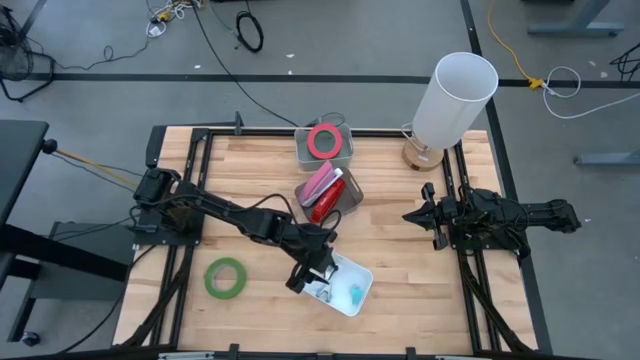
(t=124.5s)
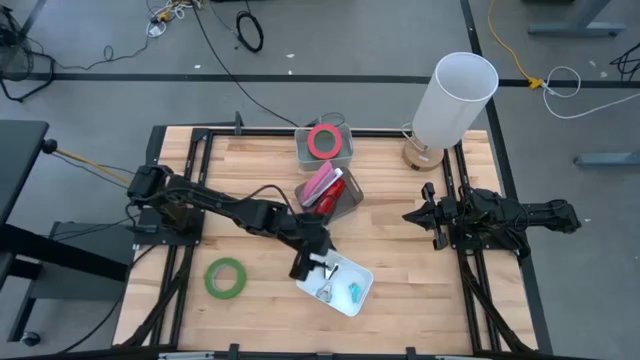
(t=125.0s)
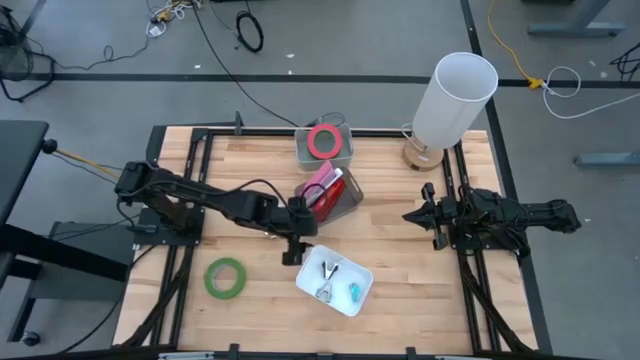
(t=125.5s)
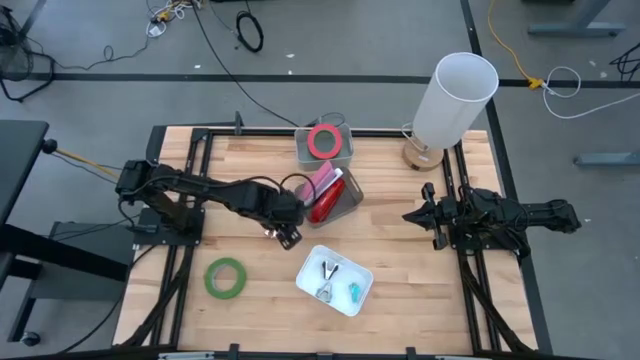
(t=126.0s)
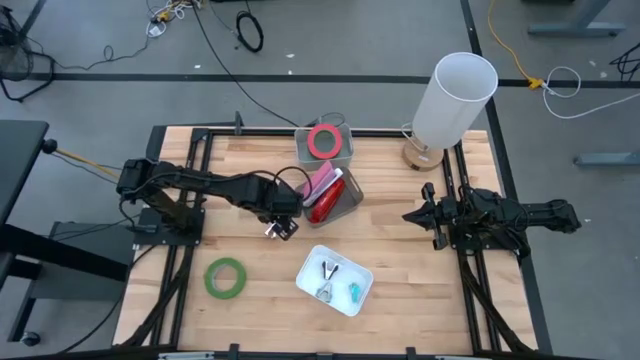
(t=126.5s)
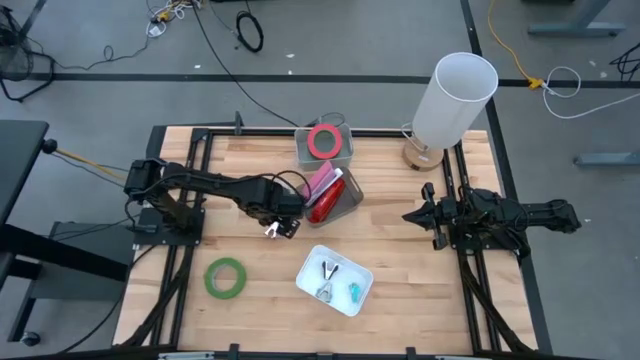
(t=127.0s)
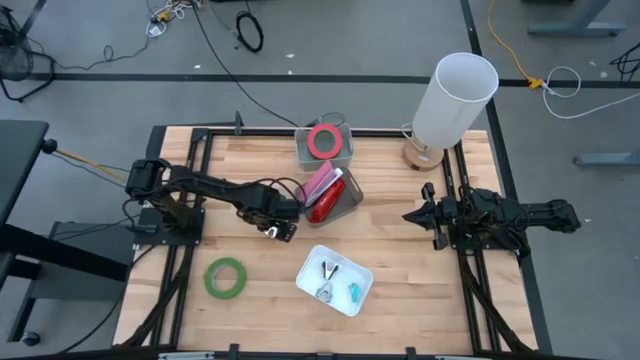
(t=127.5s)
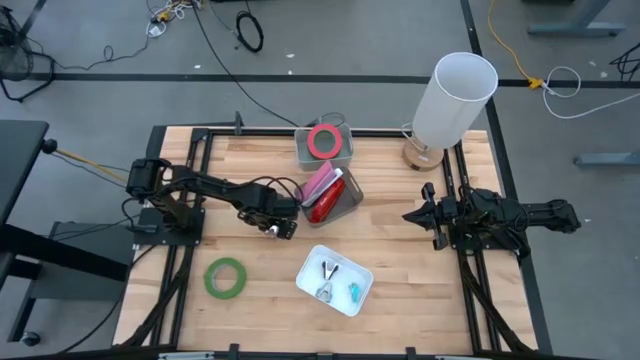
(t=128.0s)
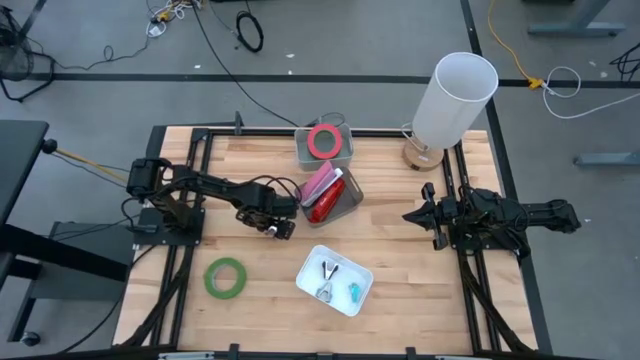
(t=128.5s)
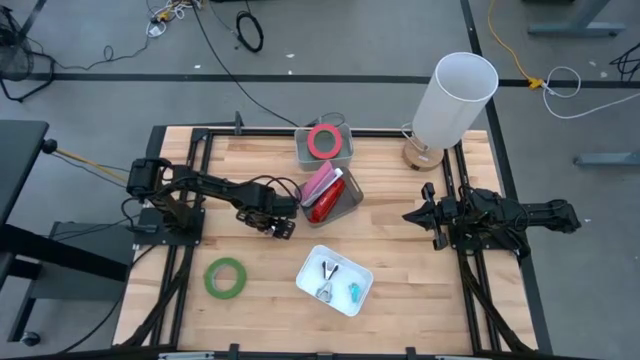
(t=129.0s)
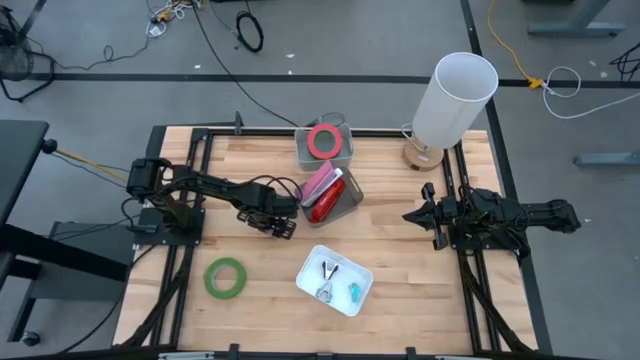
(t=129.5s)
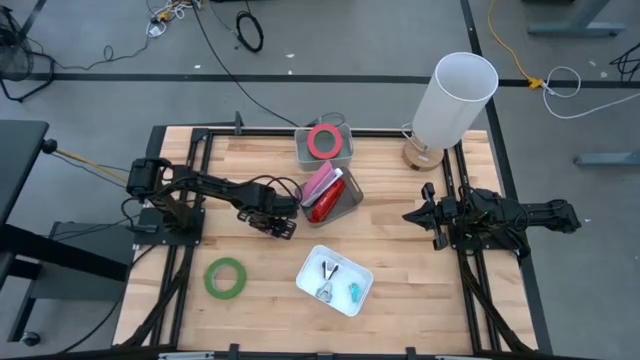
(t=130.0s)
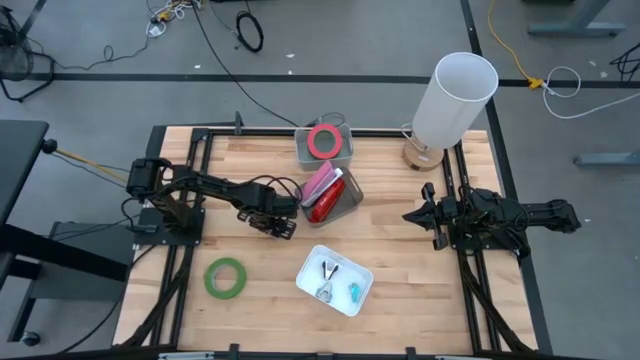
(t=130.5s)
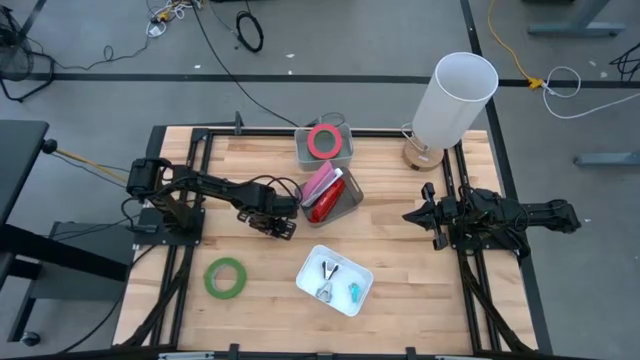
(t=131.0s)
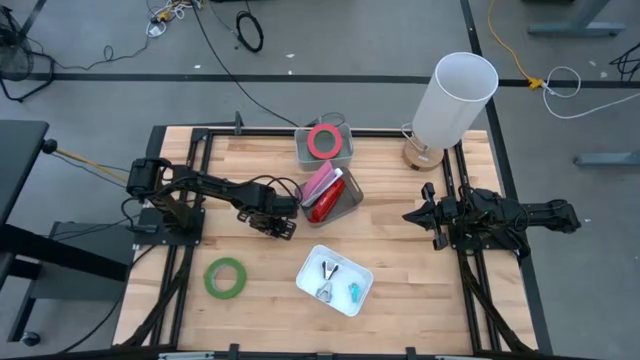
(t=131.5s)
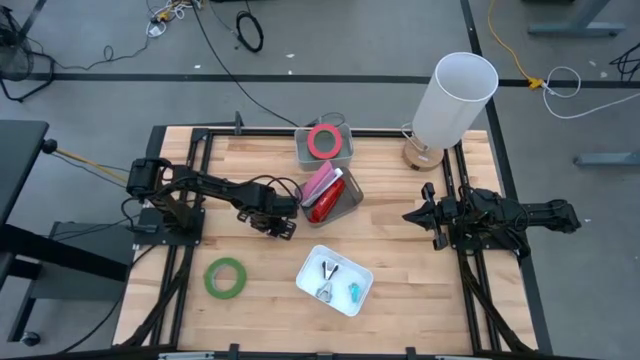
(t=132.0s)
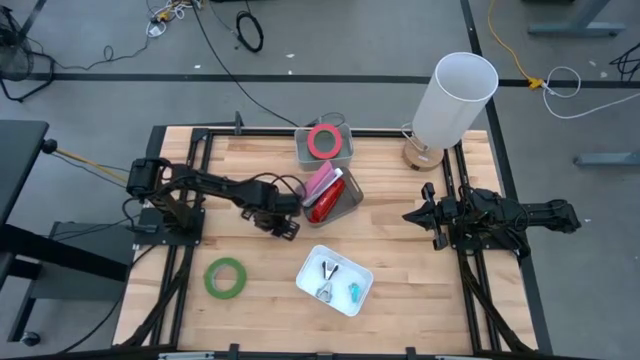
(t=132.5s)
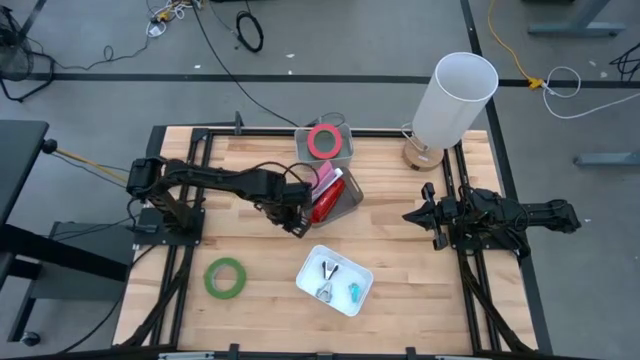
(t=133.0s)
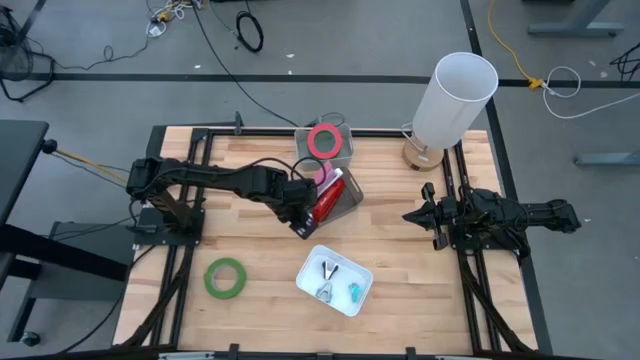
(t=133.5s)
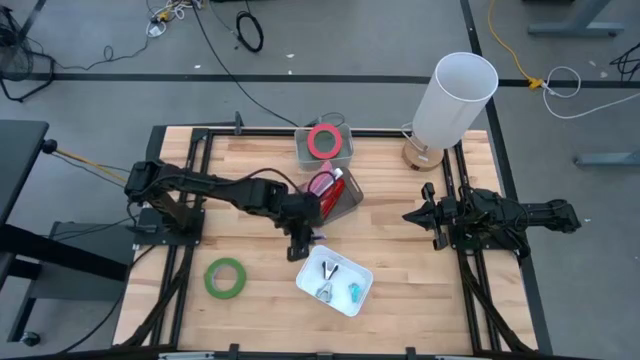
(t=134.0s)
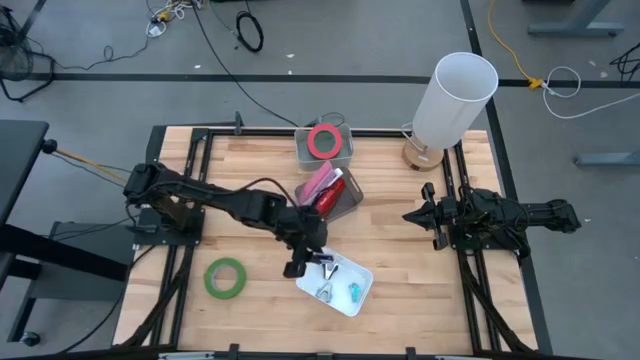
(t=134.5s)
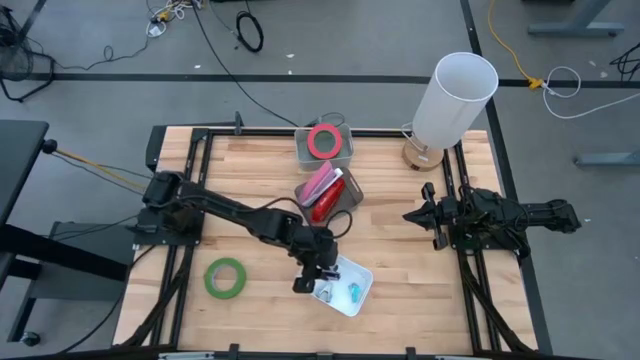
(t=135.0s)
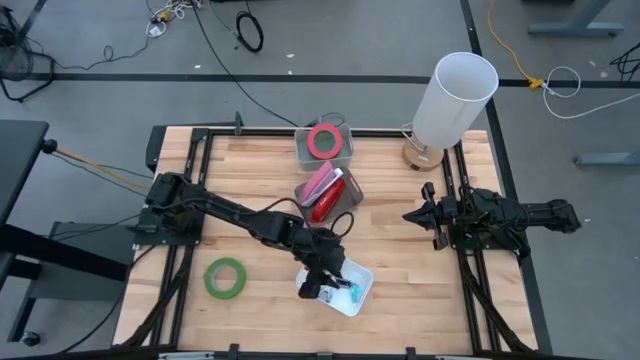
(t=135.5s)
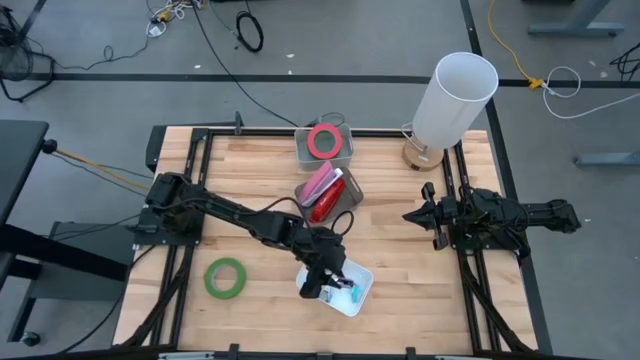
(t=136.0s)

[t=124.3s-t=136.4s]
Task: Pick and place Stapler, Stapler remover, tape
Put the purple staple remover into the white bin

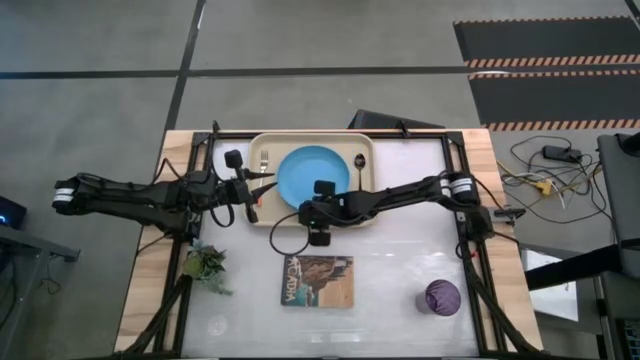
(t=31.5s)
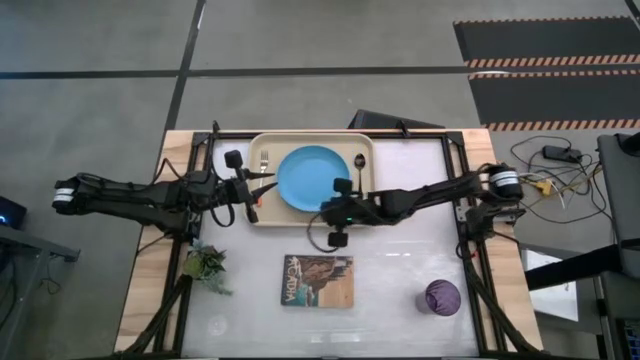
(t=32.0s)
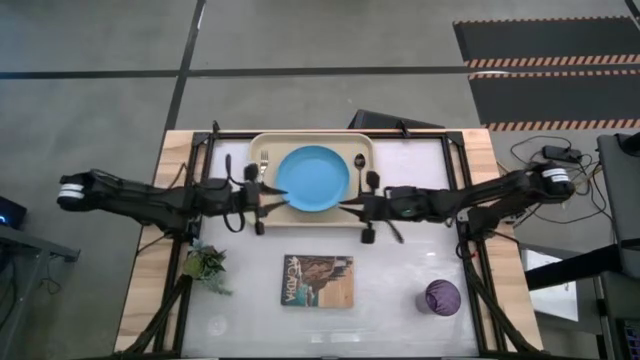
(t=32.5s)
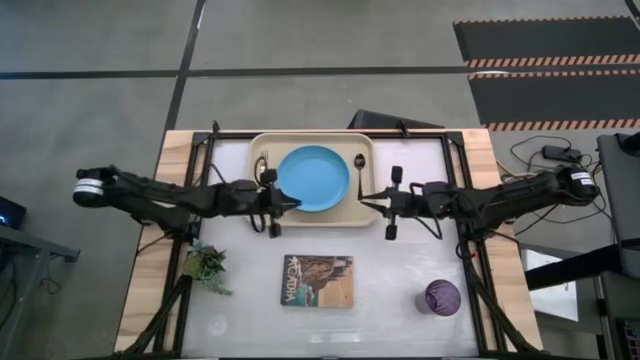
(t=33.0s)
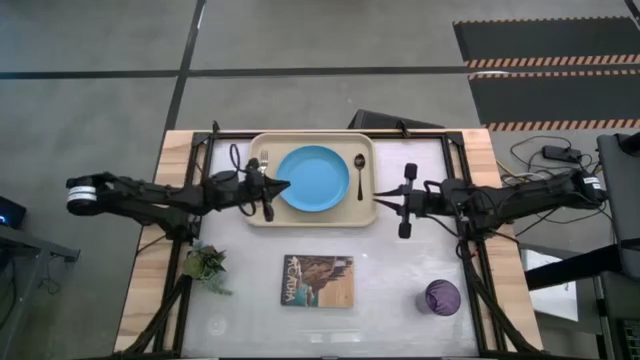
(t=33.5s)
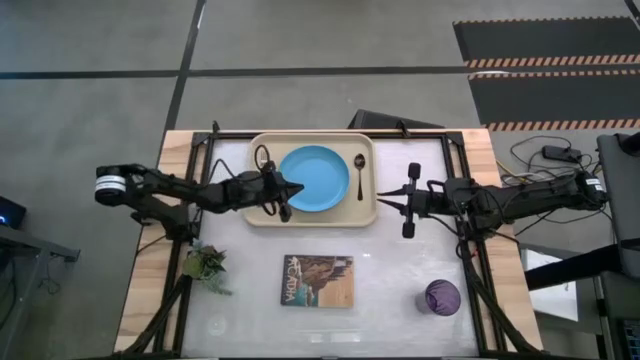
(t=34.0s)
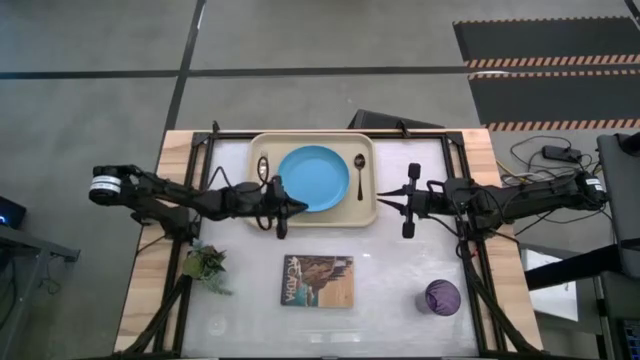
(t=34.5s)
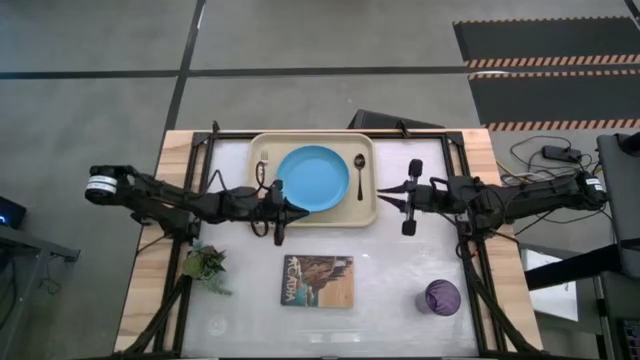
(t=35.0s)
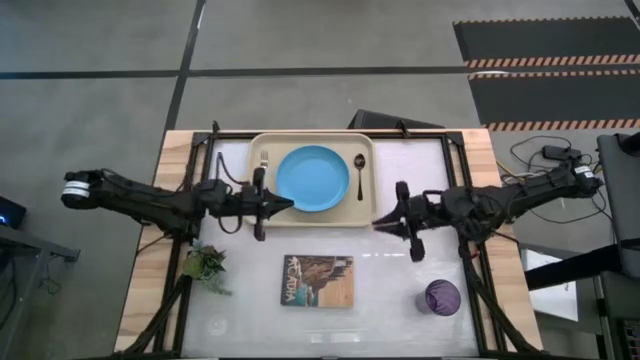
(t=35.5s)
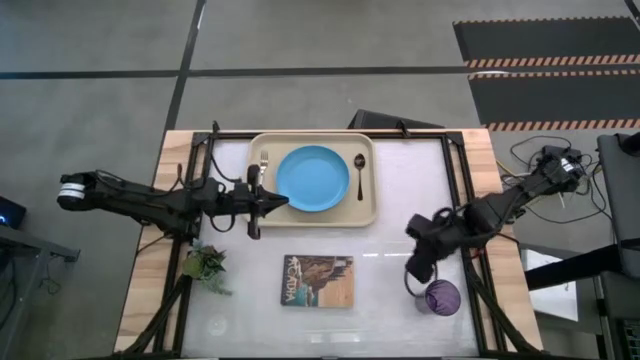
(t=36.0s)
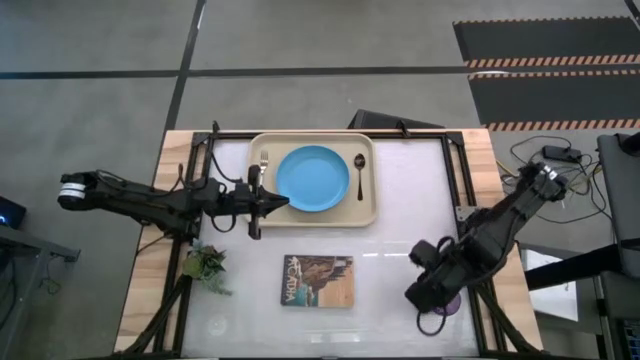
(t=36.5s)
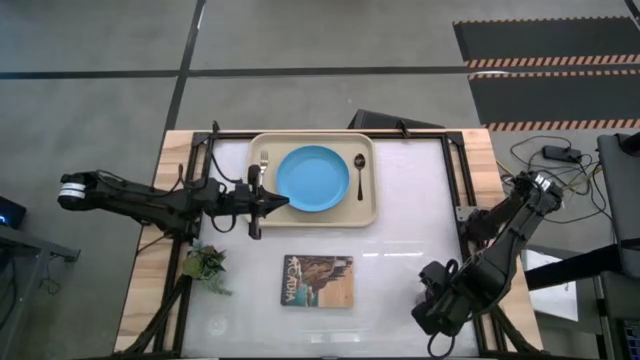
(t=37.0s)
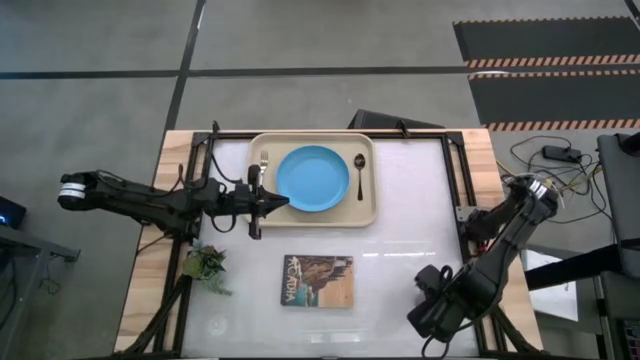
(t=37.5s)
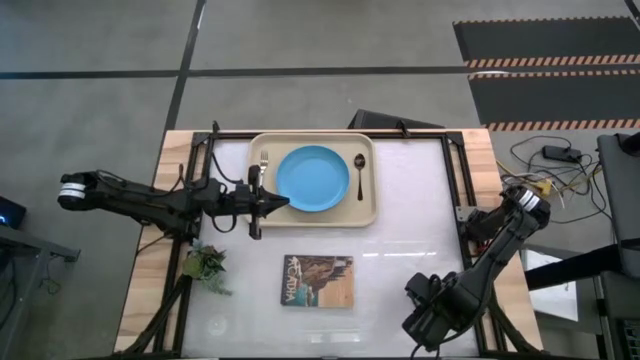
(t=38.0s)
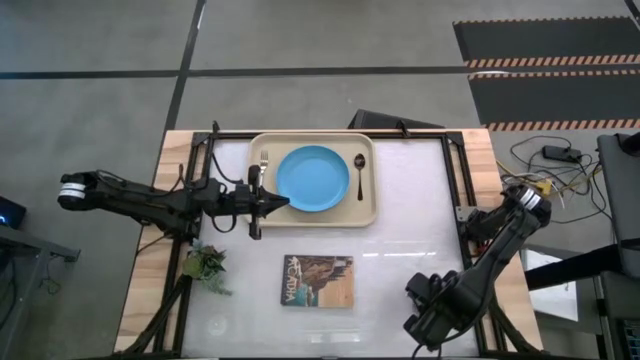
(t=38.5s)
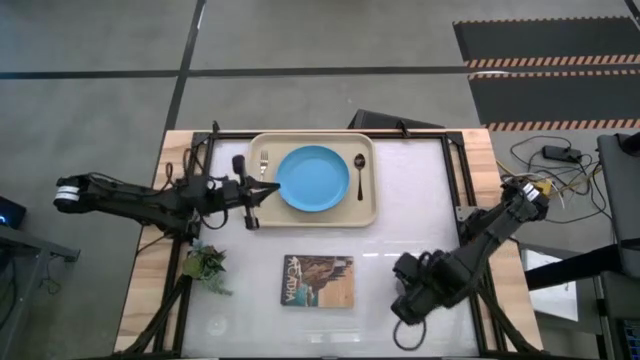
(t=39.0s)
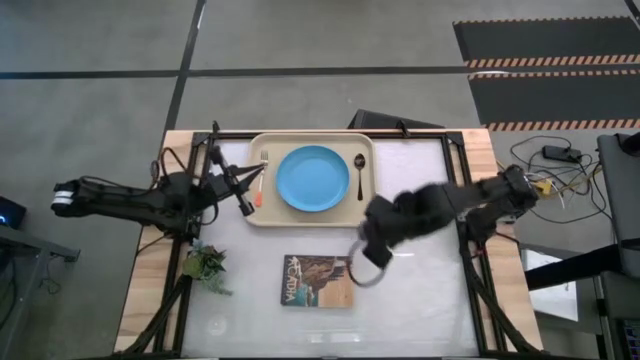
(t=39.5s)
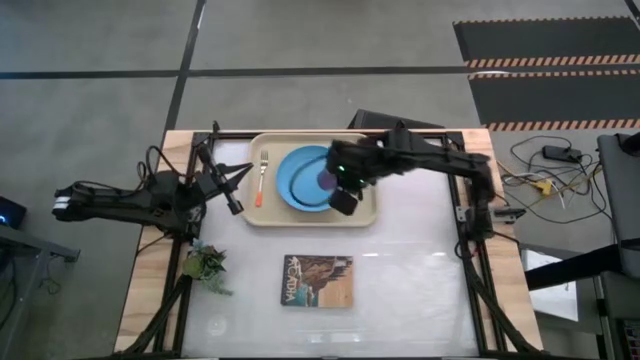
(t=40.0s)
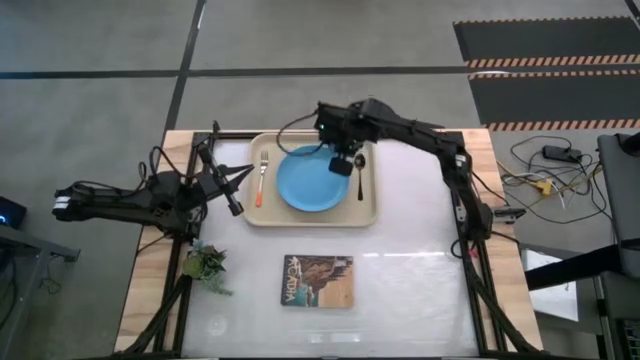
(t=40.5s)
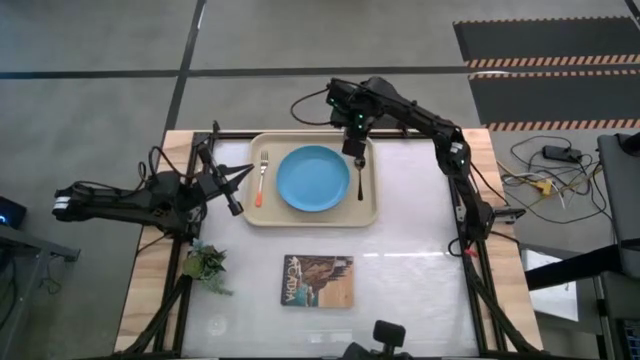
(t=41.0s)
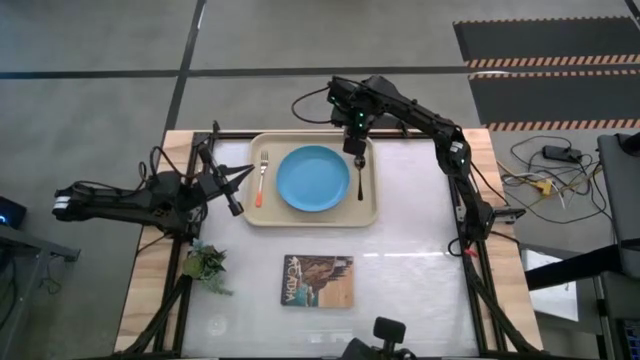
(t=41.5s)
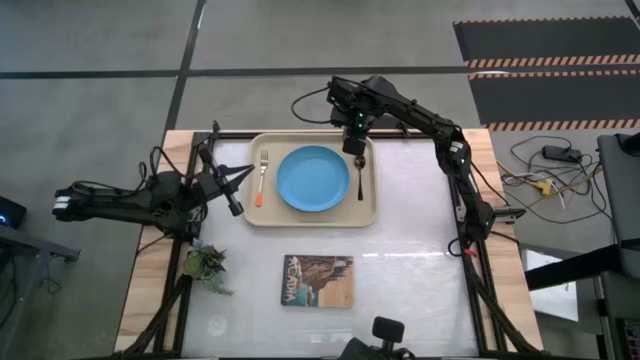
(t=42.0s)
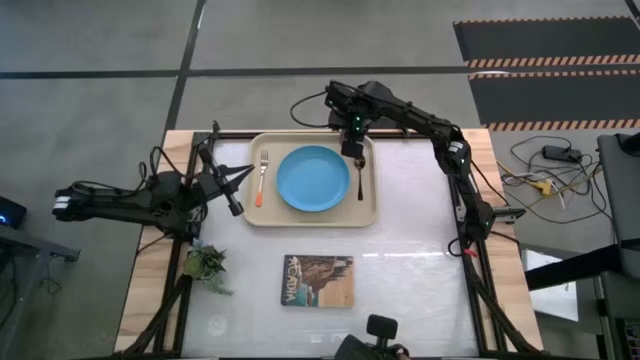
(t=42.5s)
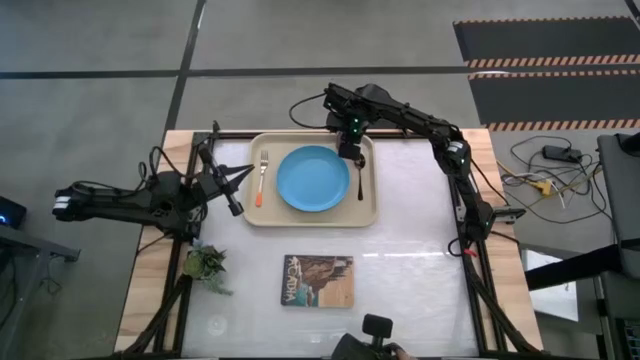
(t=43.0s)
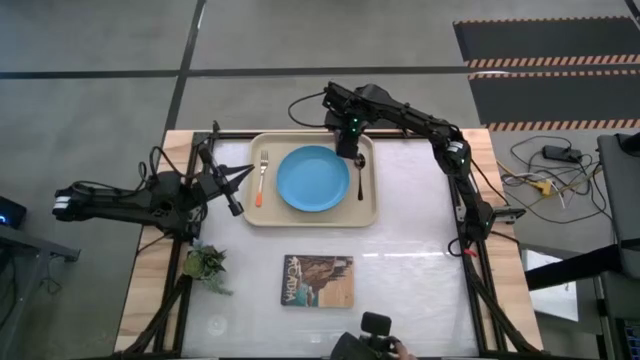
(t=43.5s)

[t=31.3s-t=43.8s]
Task: Pick and place plate/cup/fork/spoon on tray
Put the violet cup on the light brown tray to the top right of the blue plate
